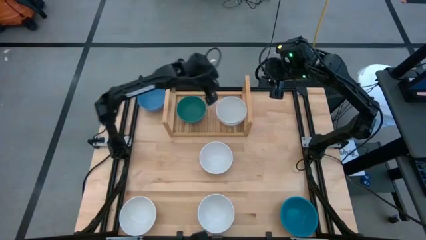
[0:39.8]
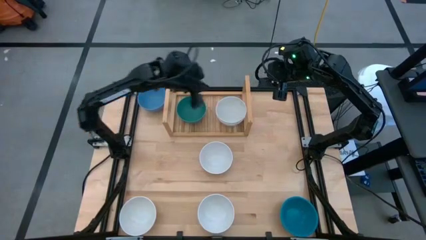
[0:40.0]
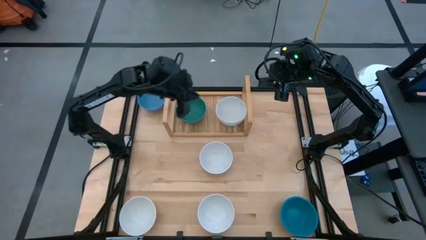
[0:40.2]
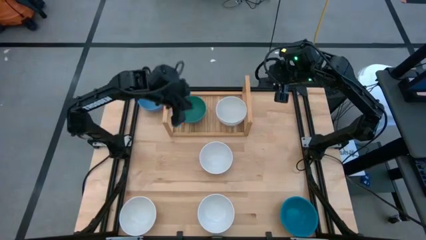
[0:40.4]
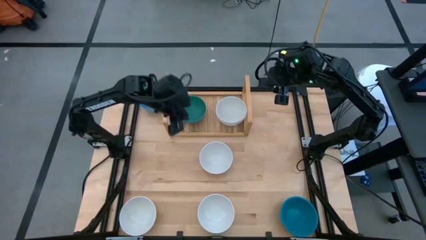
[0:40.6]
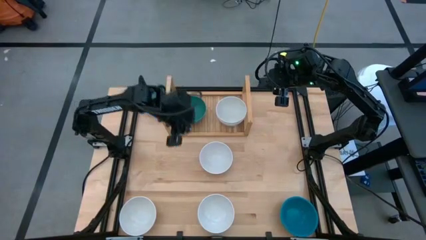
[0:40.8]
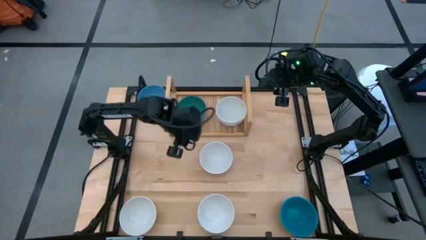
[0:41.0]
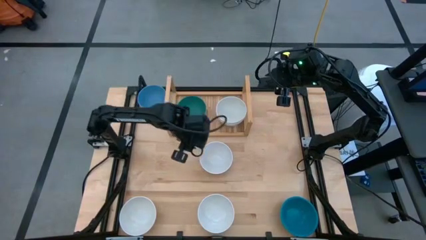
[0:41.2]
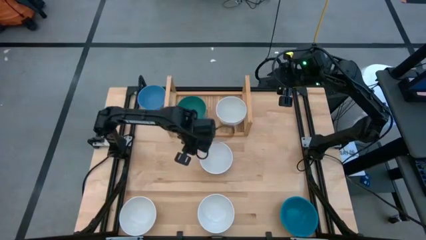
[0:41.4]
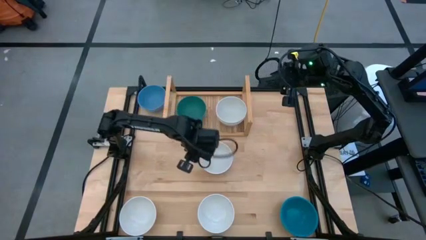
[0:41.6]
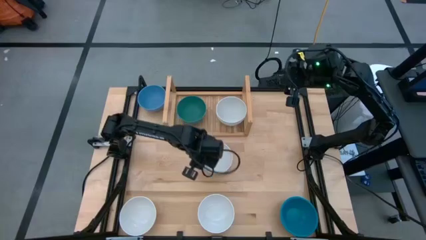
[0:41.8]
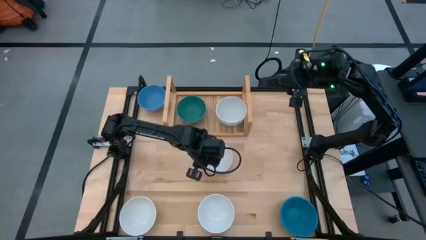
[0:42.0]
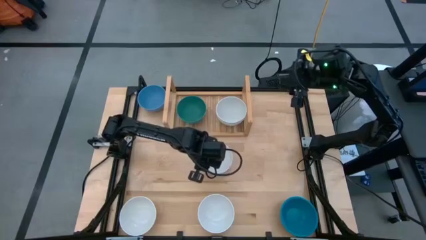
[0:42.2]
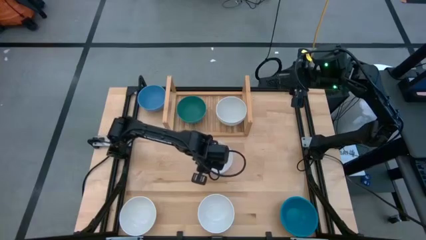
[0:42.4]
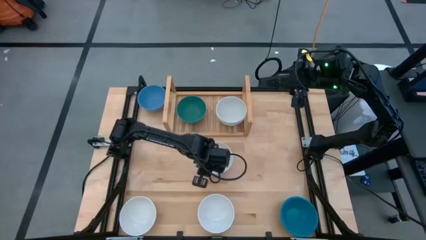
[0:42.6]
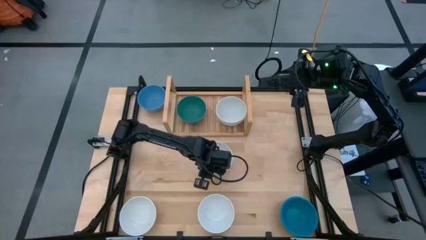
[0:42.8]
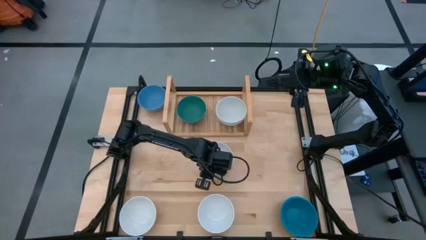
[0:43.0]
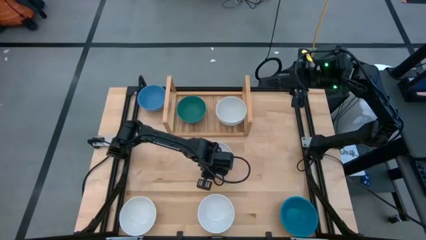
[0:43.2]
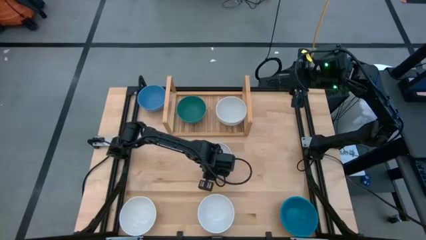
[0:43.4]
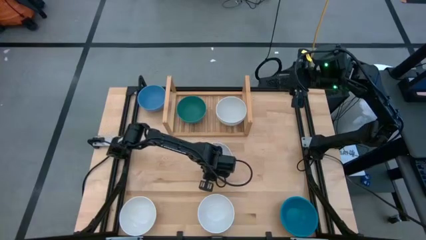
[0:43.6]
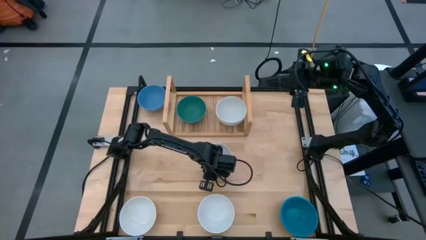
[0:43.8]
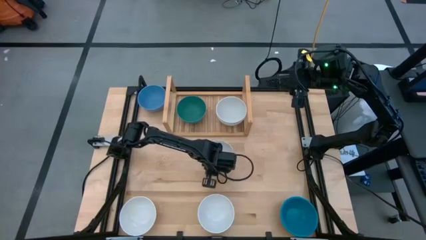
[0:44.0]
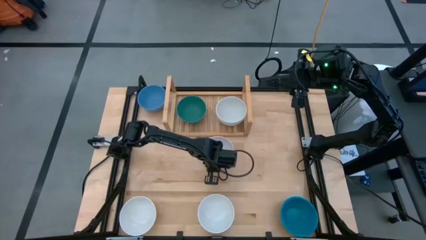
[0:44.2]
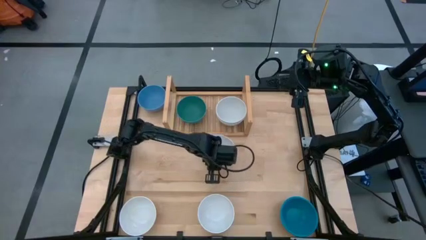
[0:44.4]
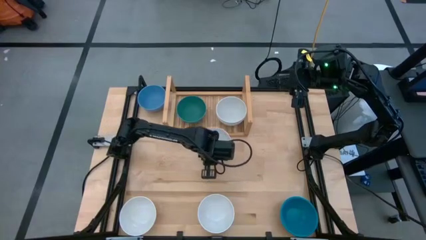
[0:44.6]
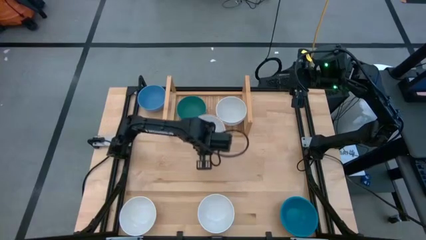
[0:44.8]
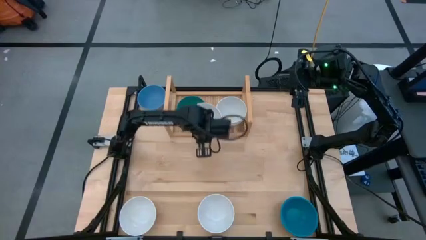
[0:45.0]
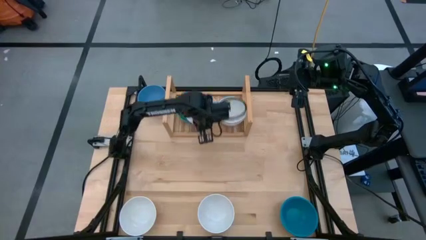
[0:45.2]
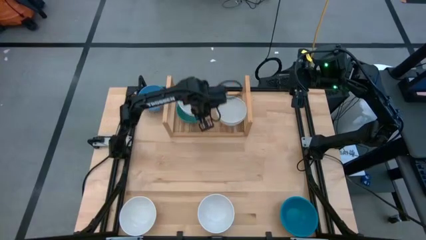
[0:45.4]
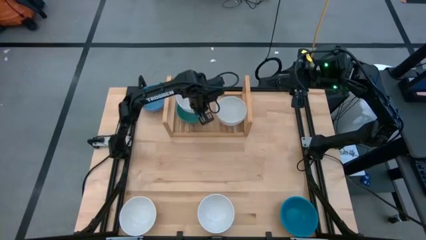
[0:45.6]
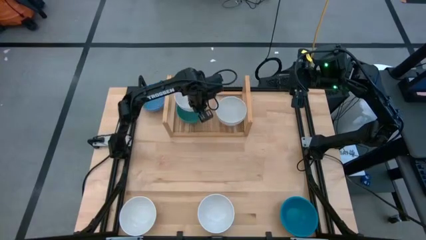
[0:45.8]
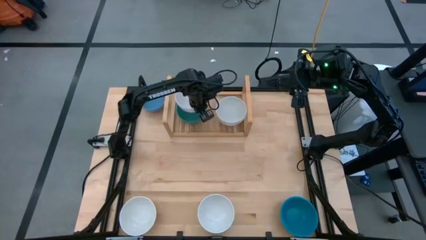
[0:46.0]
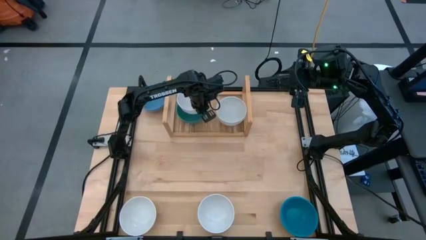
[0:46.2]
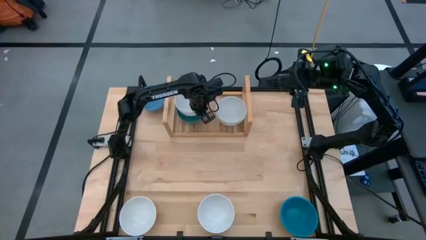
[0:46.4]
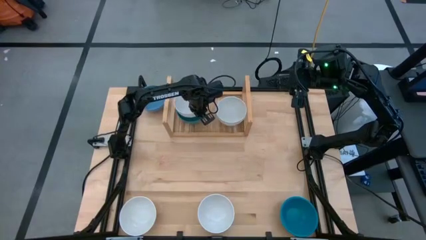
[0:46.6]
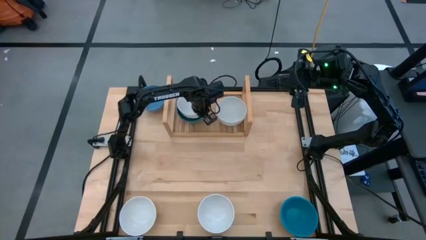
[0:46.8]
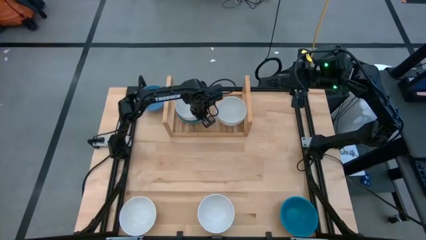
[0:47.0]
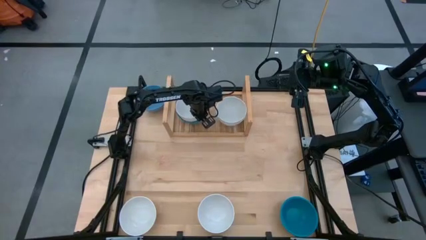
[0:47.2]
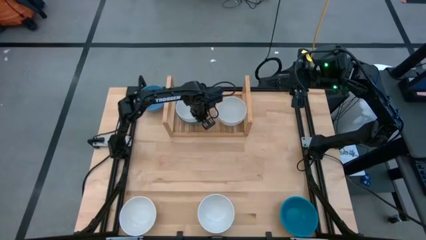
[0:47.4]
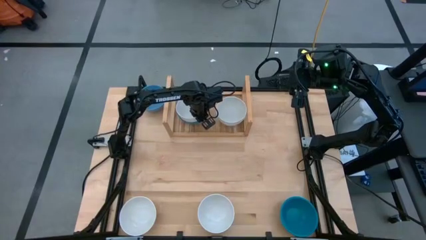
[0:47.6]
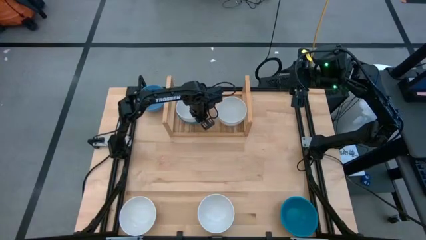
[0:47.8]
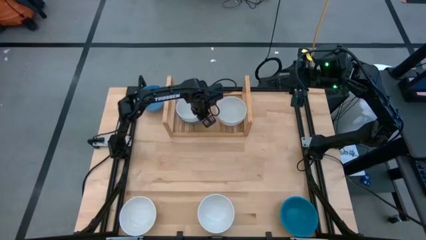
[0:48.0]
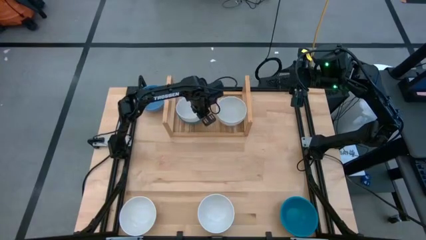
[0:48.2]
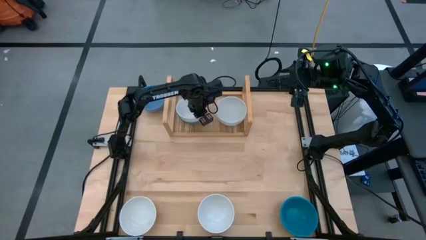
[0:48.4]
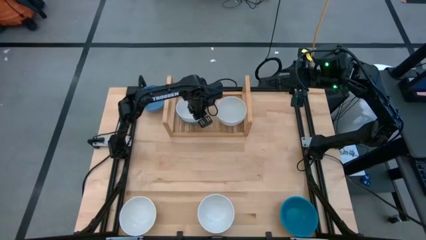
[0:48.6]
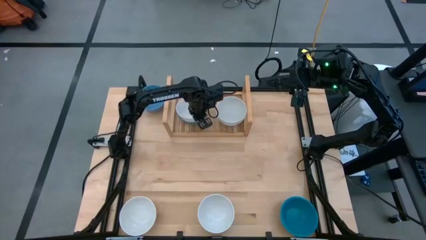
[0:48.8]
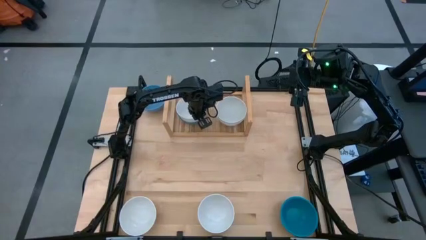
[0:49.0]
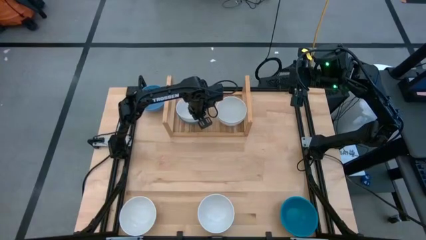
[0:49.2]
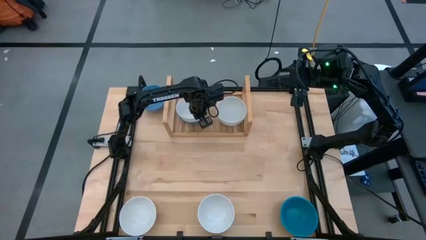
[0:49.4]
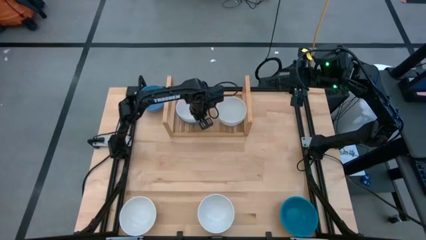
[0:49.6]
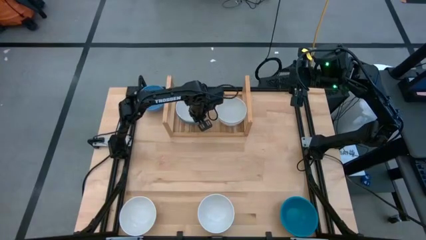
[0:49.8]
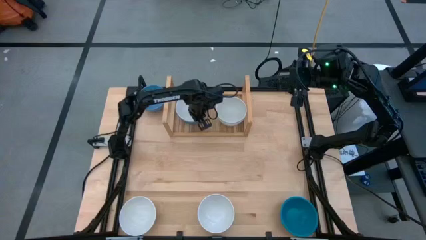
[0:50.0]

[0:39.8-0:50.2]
Task: Place and stack bowls onto a shelf
Stack the white bowl on top of the green bowl on the shelf

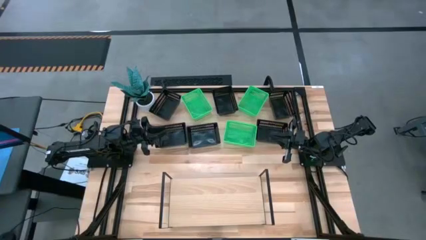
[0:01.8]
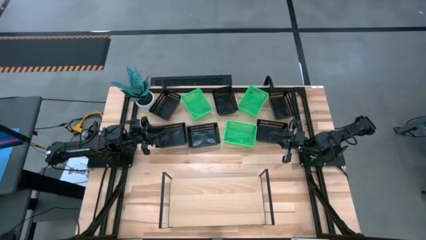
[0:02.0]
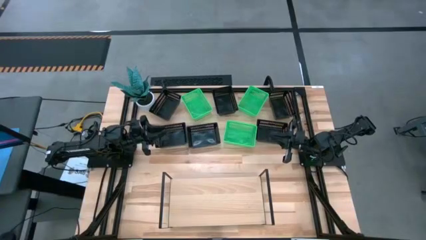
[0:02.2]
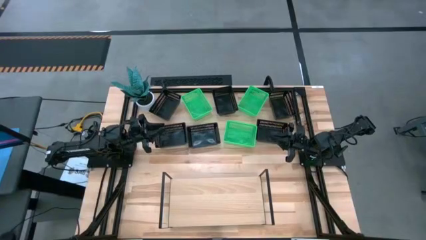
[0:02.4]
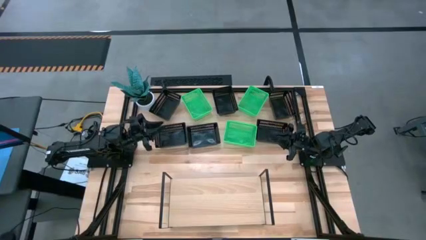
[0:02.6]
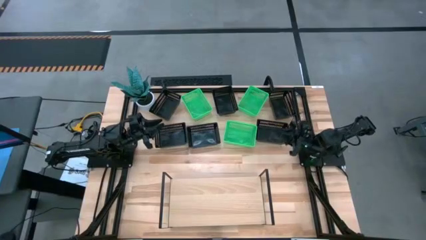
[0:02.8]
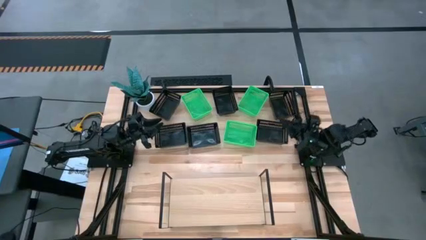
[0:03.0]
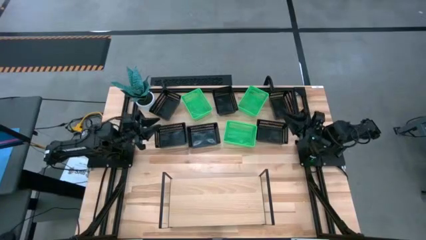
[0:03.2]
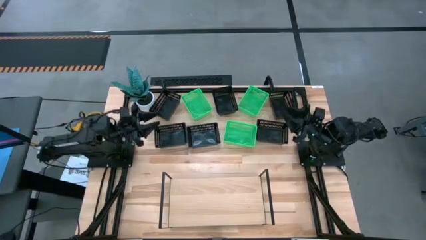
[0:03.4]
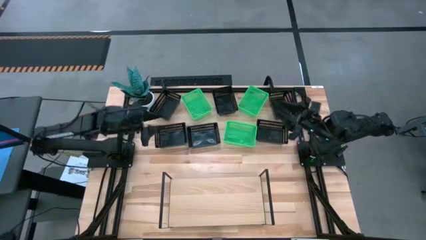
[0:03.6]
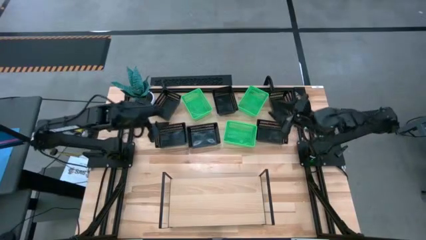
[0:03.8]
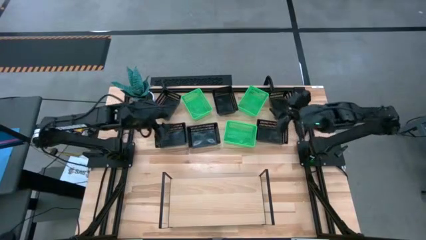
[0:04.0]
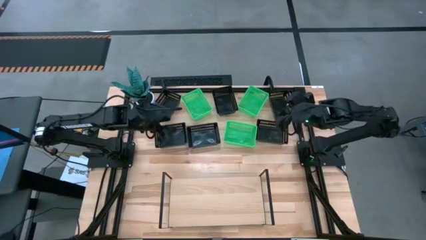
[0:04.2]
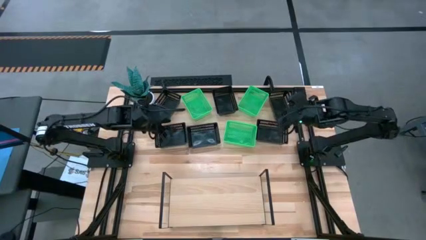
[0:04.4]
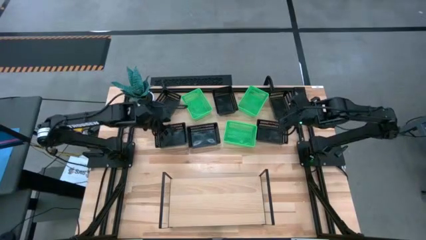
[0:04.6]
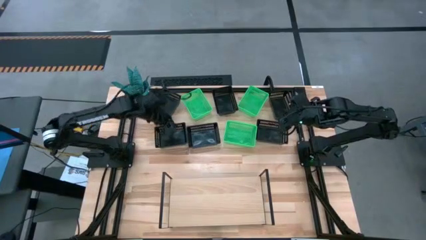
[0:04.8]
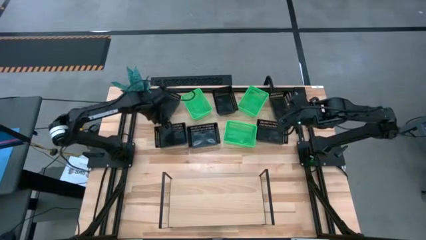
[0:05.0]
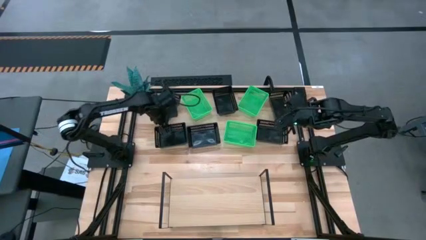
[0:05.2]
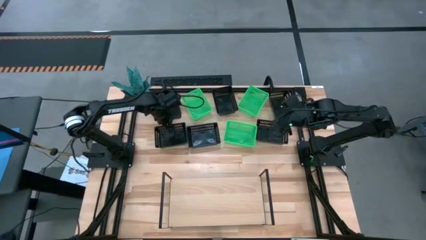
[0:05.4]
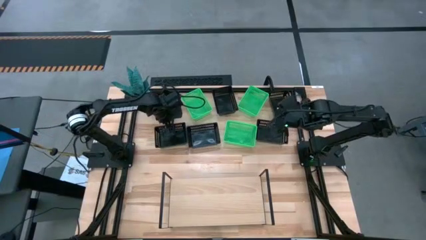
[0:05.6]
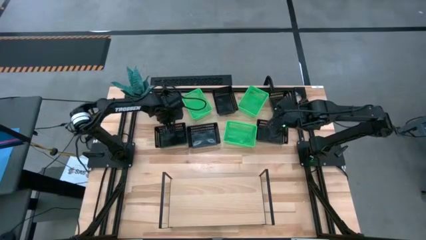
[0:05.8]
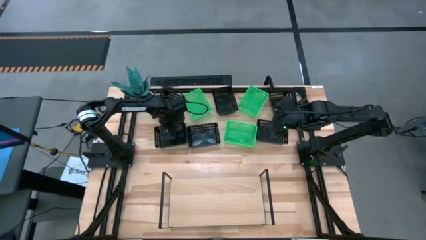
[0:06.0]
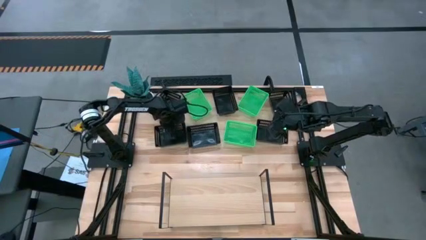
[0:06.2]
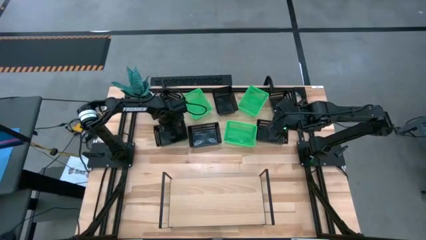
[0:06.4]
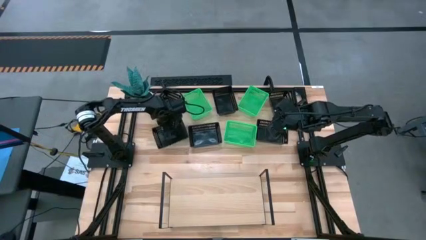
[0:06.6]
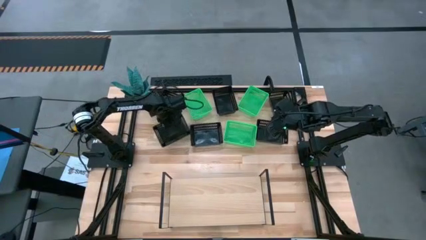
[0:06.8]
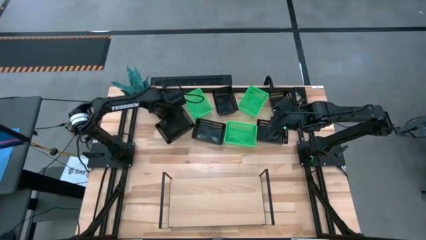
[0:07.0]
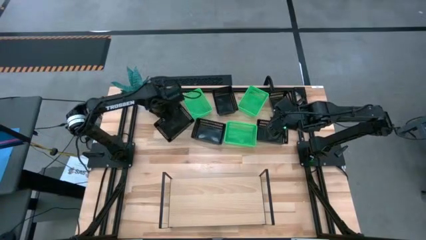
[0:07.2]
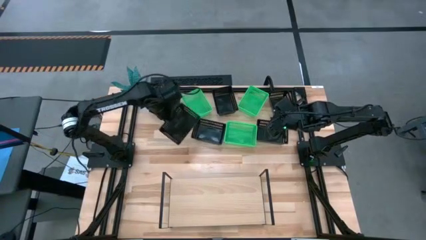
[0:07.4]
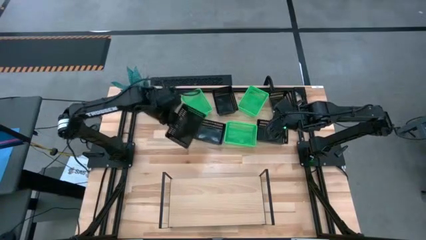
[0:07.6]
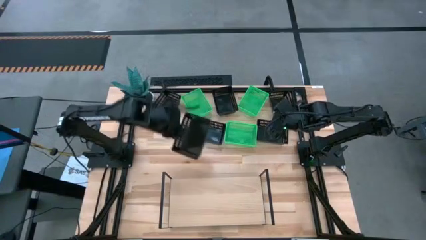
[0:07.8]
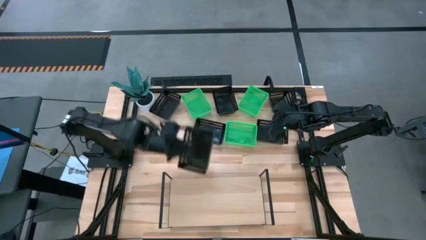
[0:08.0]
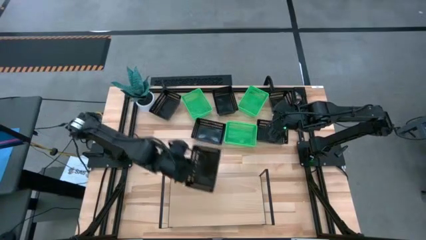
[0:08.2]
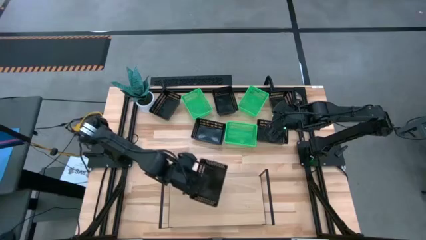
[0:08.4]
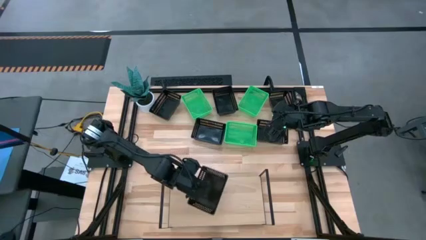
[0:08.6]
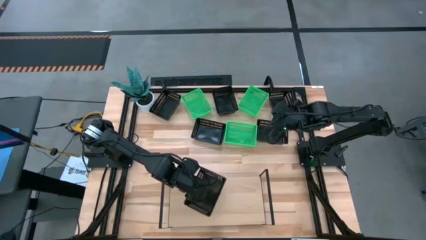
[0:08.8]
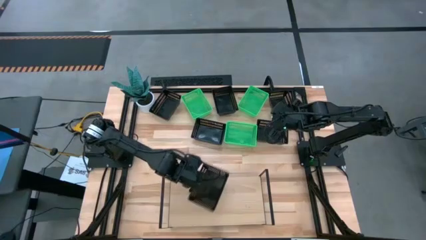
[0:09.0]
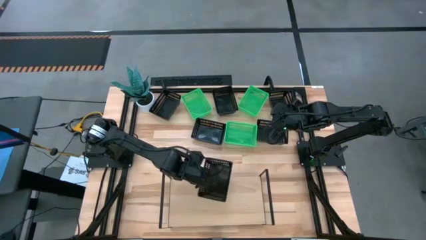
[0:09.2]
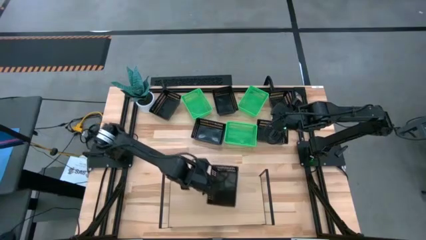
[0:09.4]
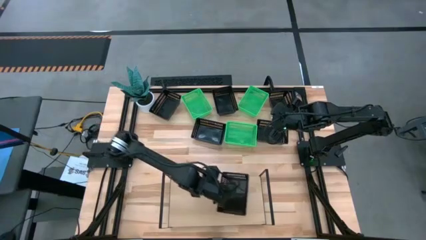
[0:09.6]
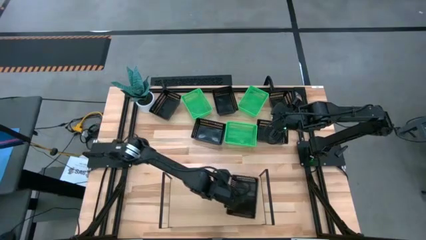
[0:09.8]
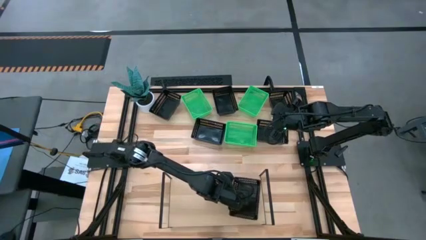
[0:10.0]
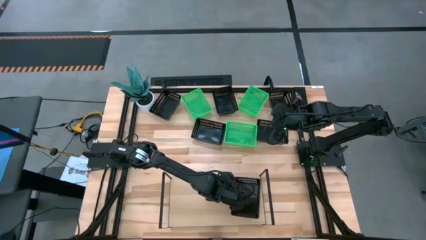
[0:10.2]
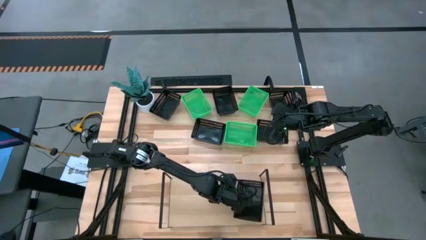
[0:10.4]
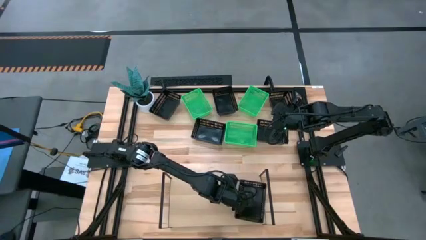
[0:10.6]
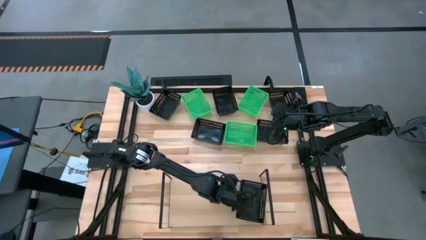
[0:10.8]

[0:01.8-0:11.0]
Task: Stack baskets on shelf by color
Put the black bin on the shelf
